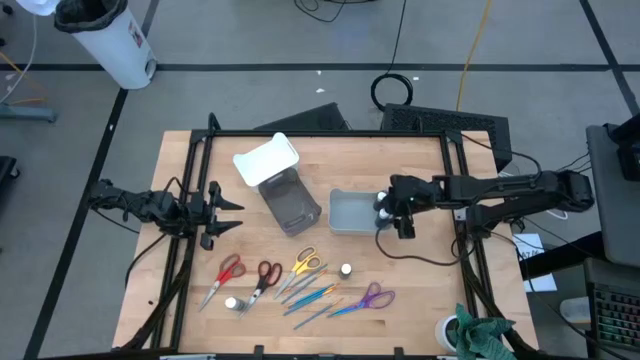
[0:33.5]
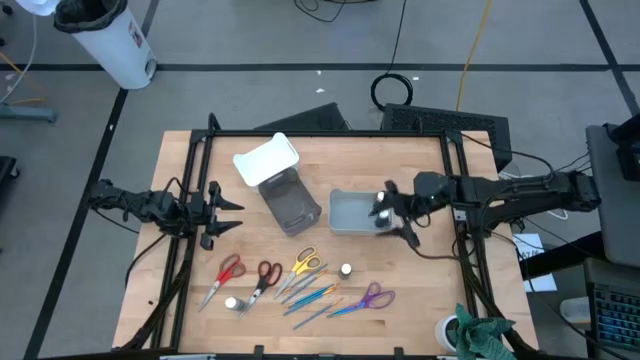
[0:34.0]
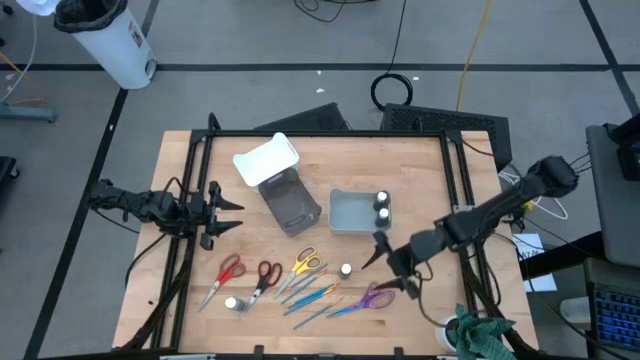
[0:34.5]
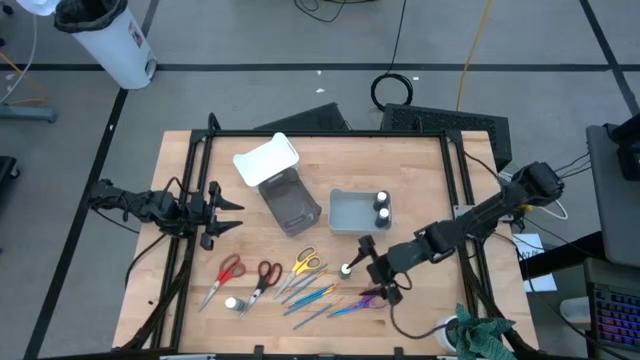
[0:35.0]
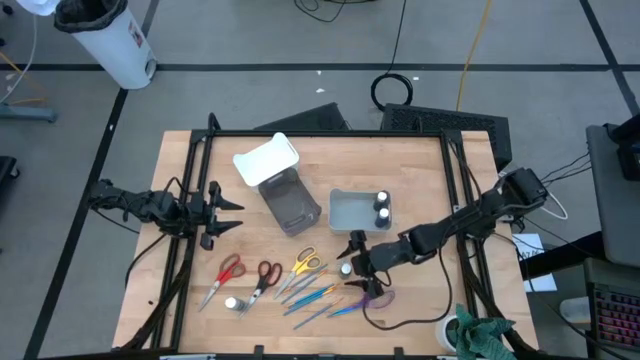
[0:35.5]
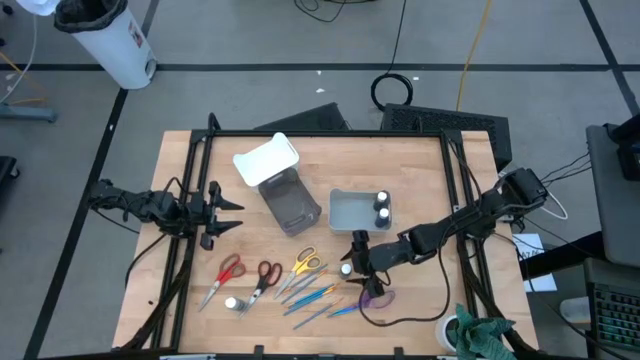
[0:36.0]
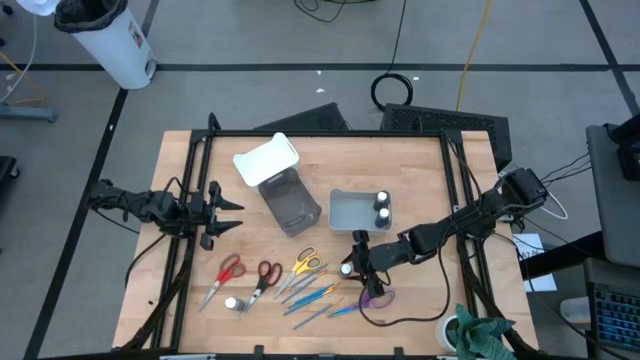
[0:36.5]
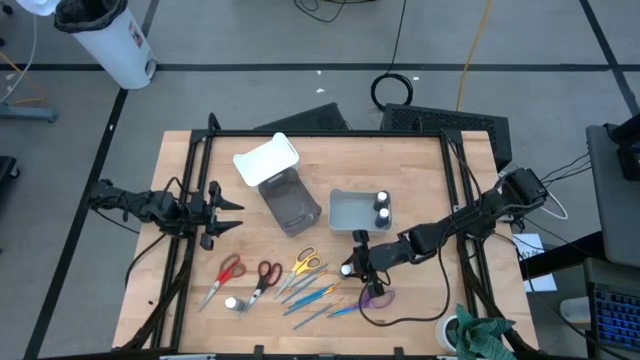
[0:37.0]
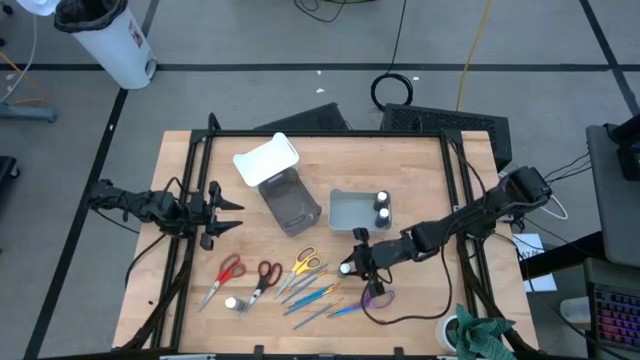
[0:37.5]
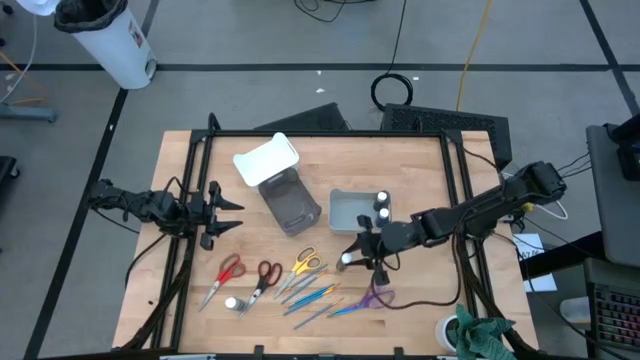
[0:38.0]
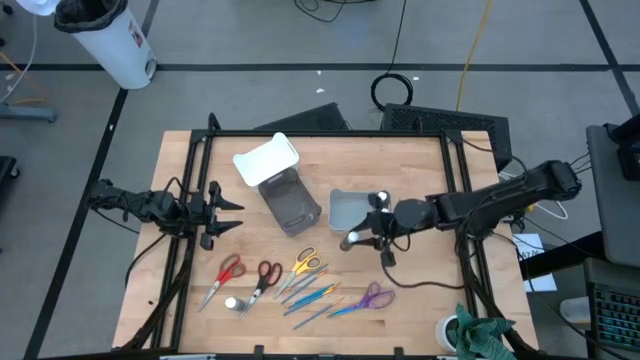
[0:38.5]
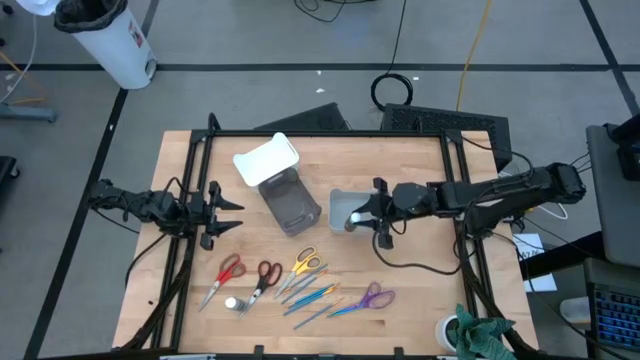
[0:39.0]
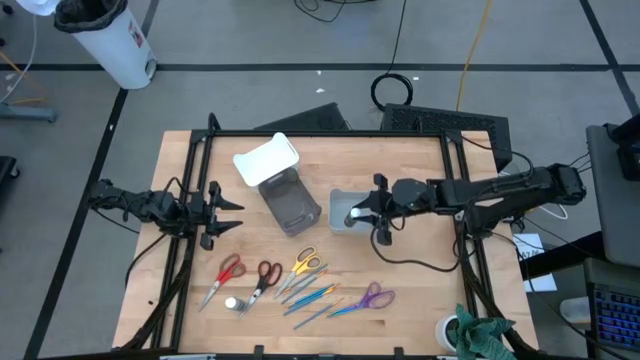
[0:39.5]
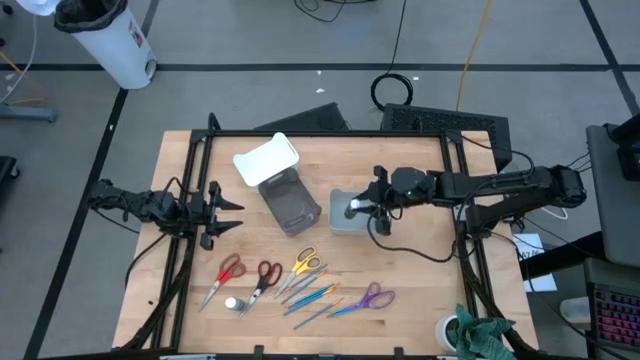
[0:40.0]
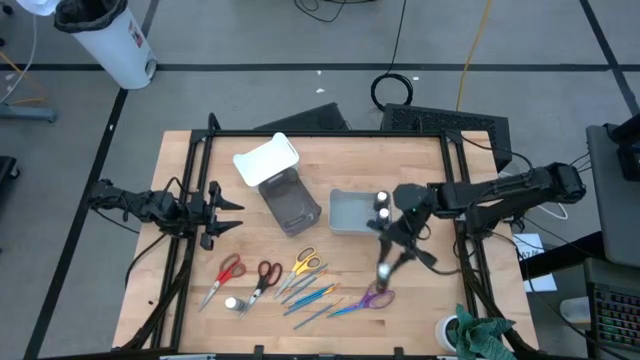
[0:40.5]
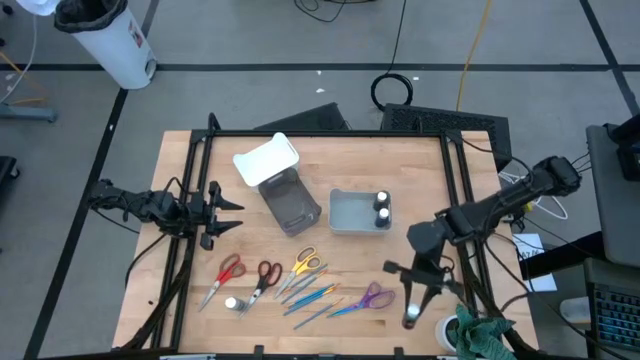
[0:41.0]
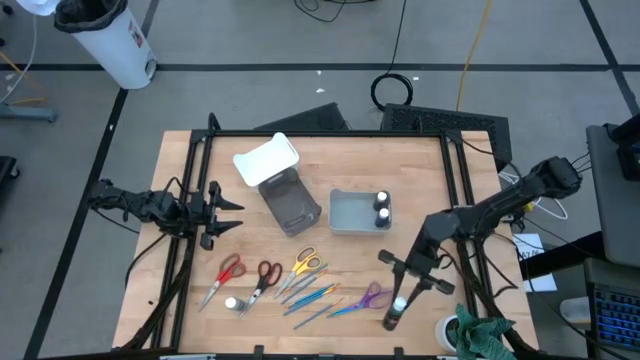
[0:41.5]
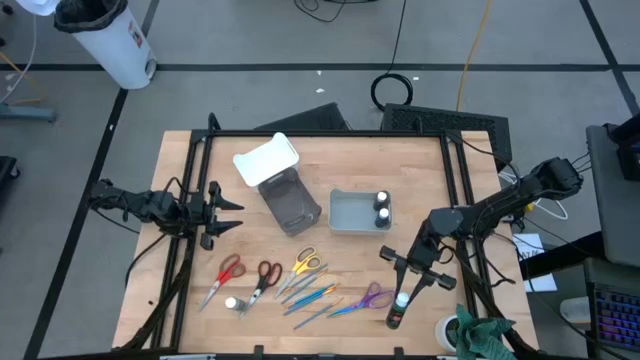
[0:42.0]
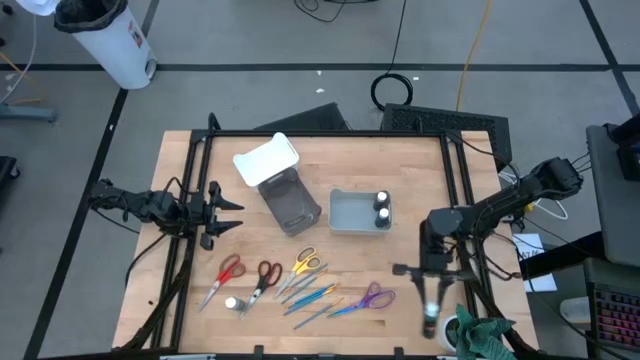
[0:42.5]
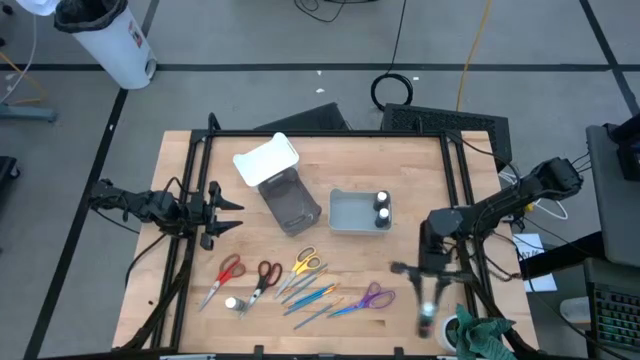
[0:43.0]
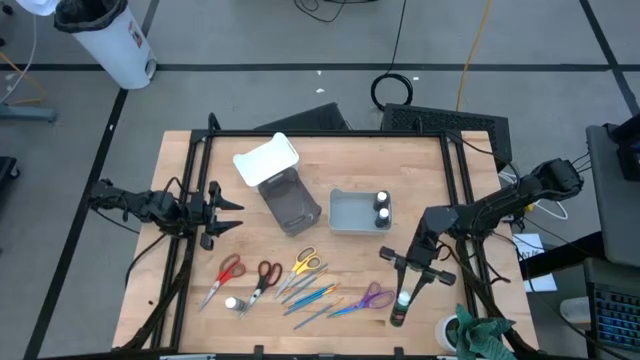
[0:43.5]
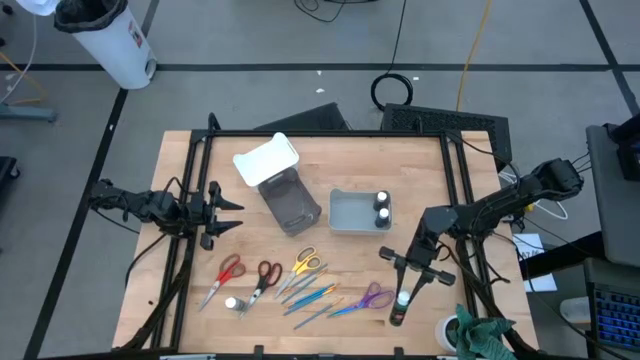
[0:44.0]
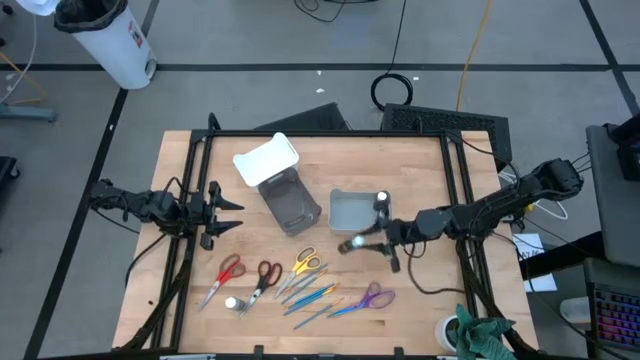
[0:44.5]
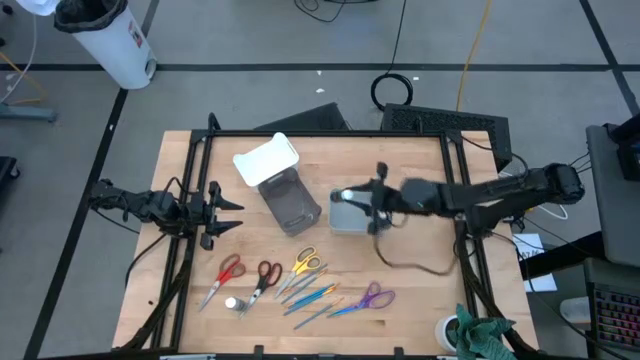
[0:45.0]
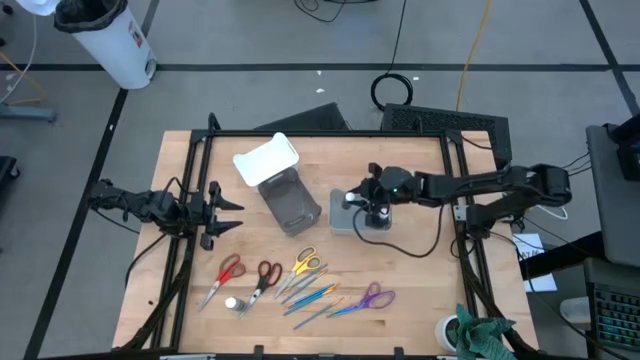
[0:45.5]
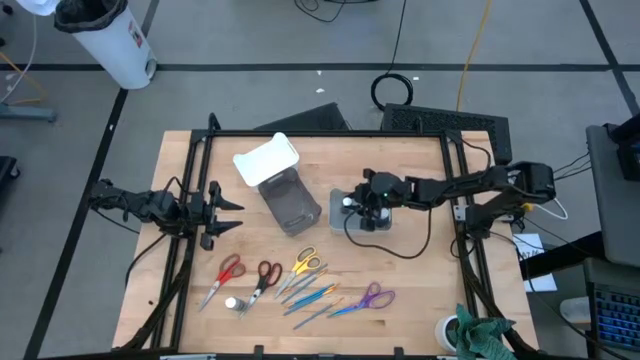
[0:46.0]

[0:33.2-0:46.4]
Task: Pick & Place Paint Supplies
Put the green paint bottle into the gray bin

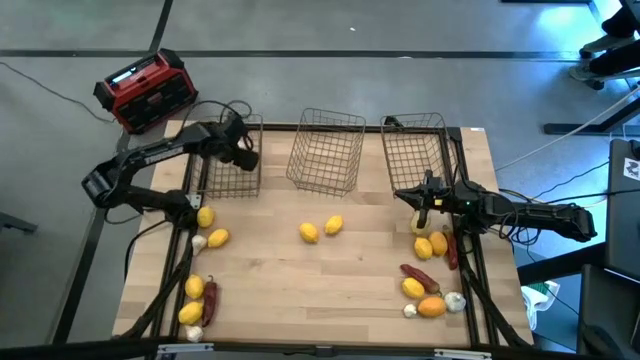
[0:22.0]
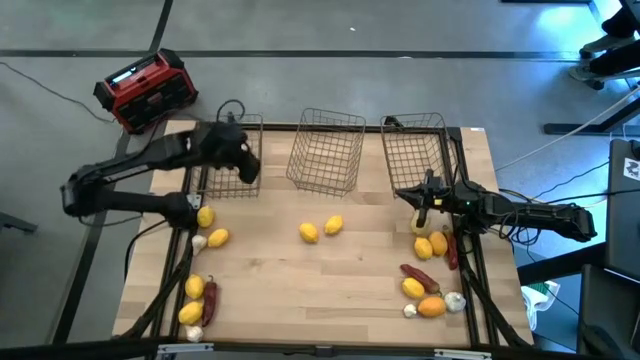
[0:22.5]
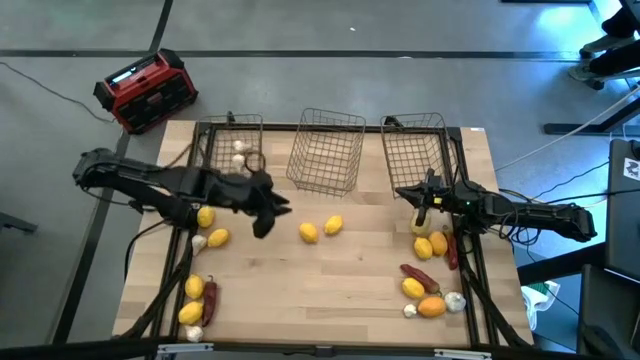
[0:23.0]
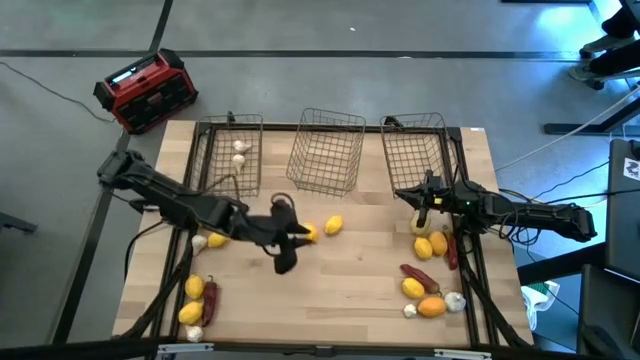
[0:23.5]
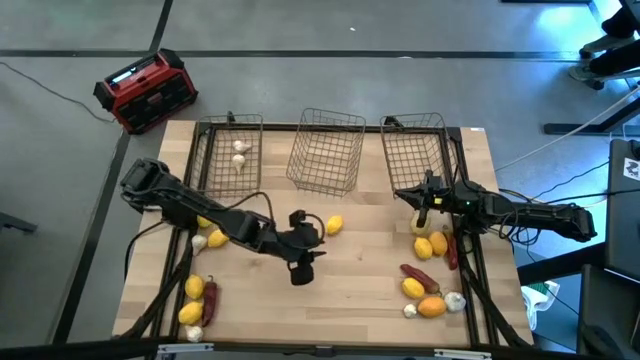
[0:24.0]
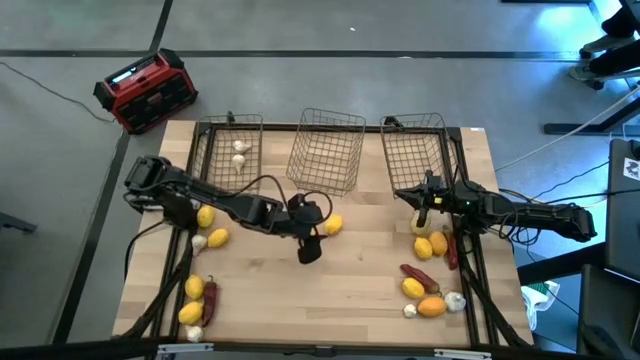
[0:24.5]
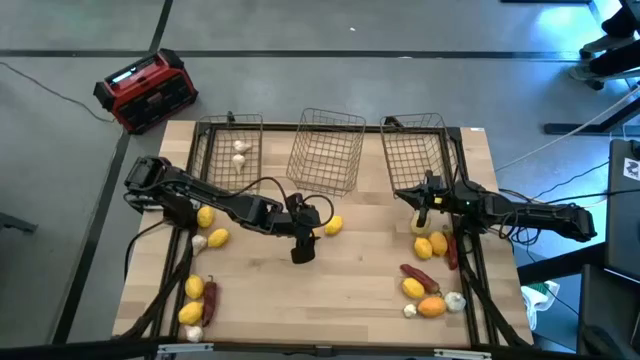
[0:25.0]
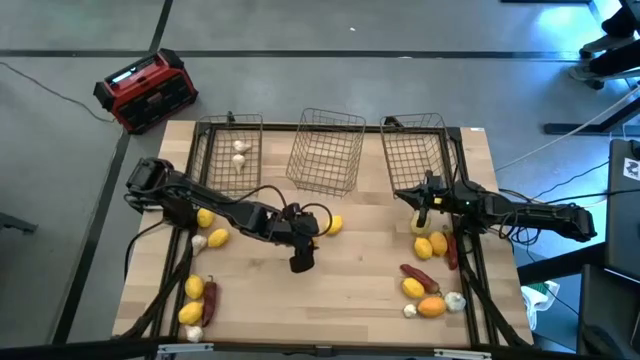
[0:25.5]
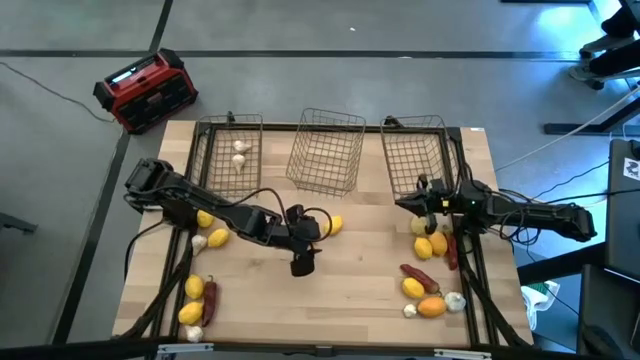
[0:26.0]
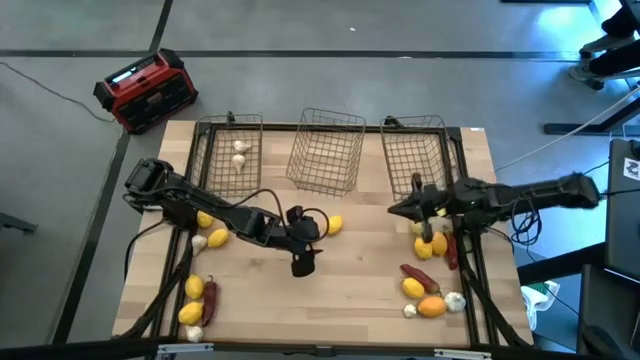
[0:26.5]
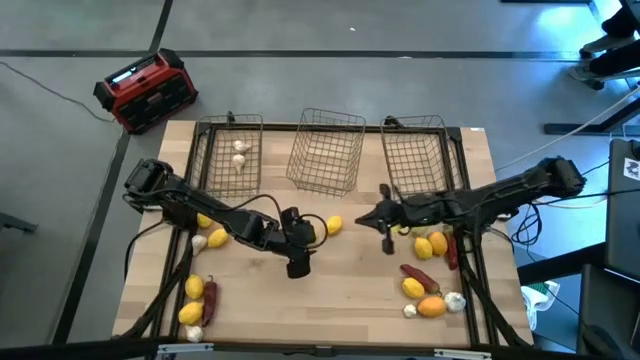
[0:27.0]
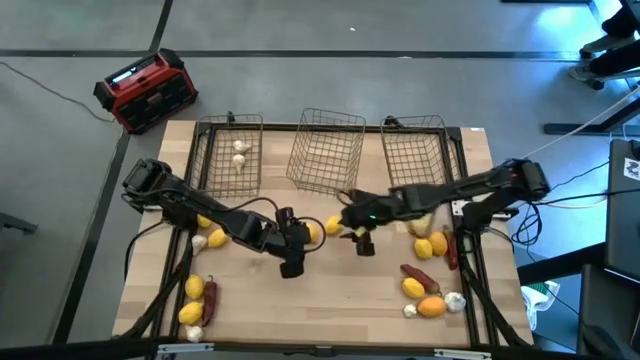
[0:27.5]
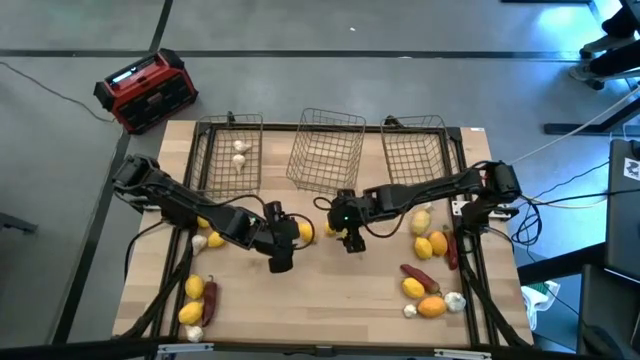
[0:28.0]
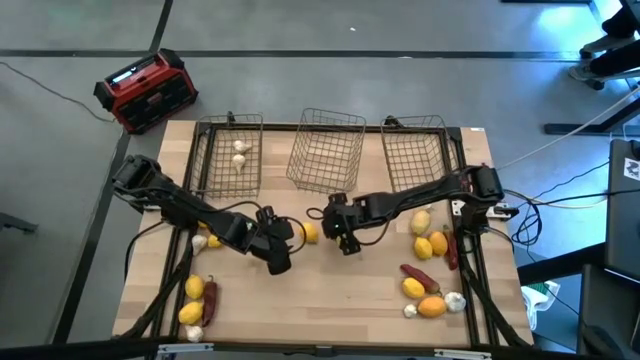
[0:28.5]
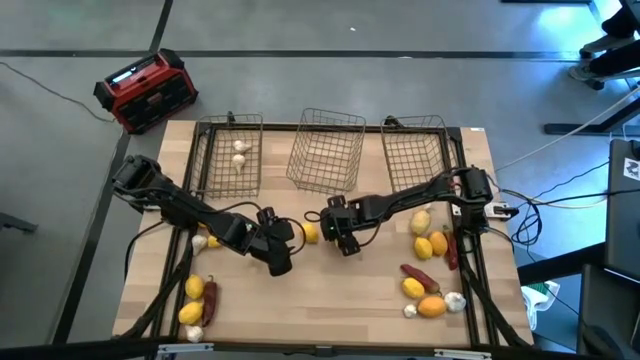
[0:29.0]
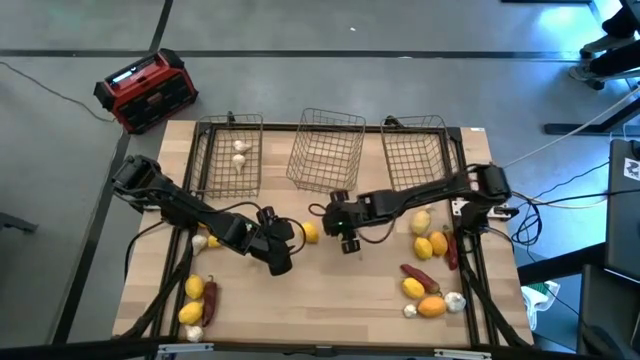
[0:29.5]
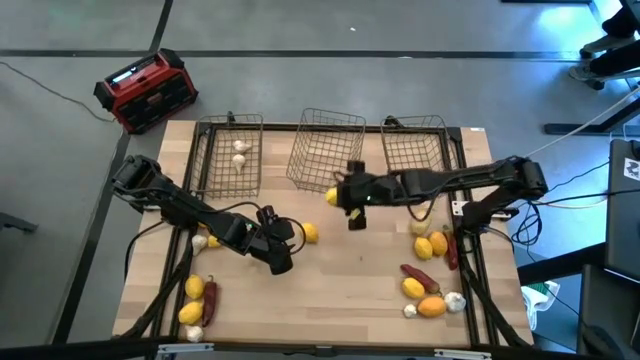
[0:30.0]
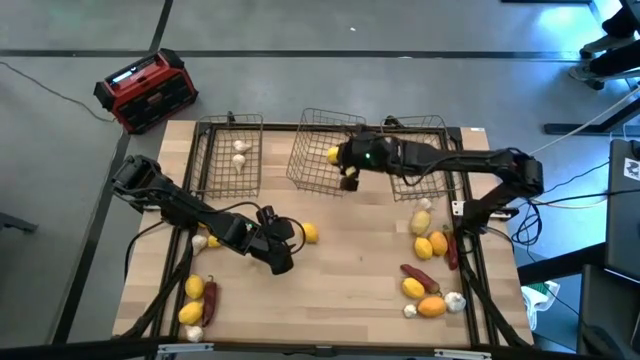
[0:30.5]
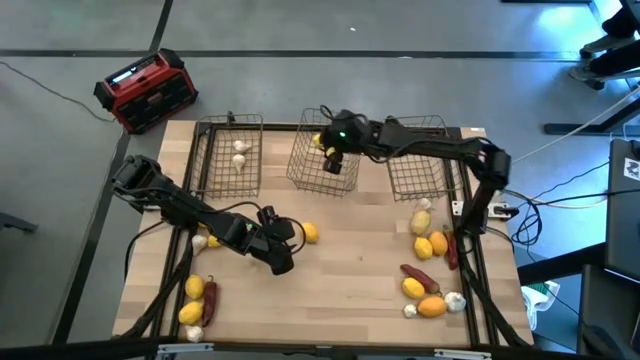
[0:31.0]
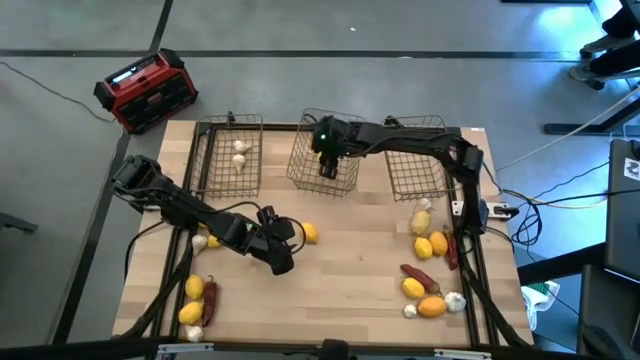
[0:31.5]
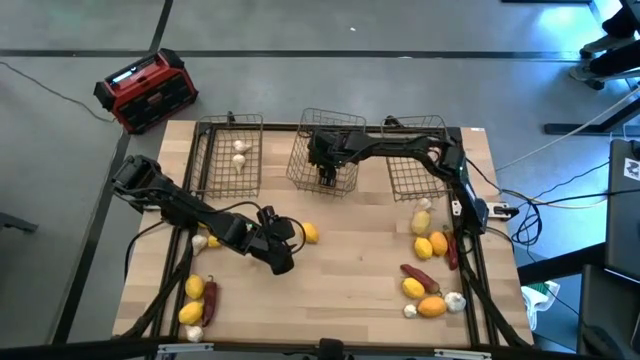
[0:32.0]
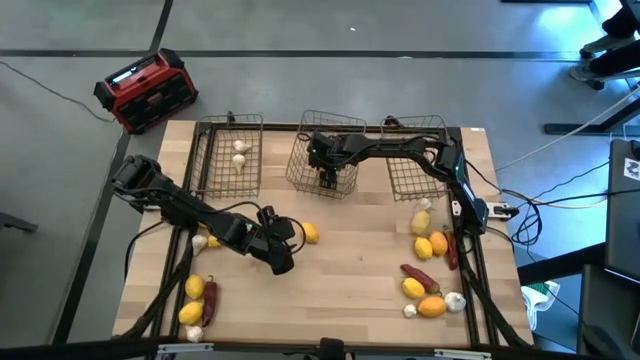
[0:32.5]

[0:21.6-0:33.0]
Task: Sort produce into baskets
Put the lemon into the middle wire basket
